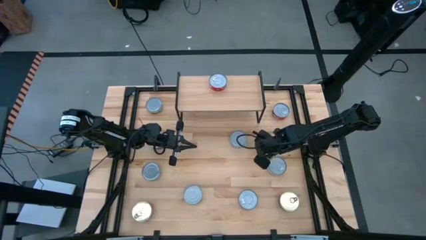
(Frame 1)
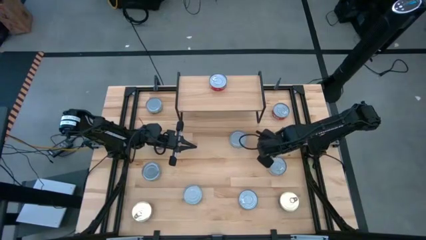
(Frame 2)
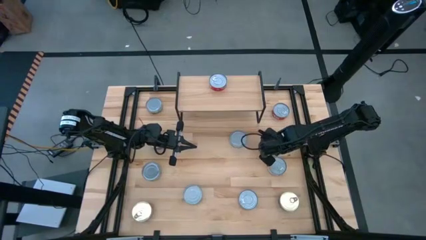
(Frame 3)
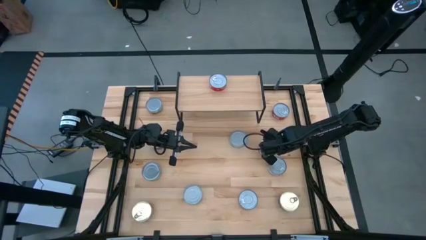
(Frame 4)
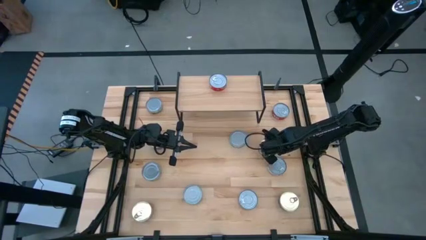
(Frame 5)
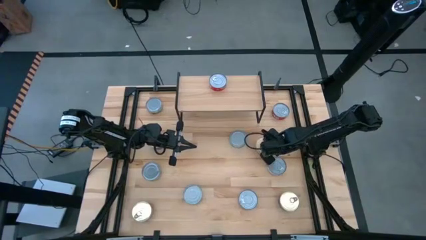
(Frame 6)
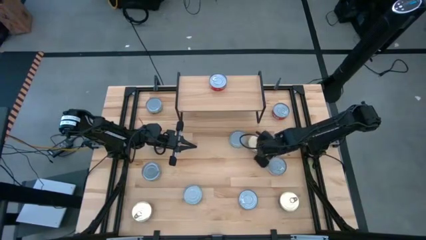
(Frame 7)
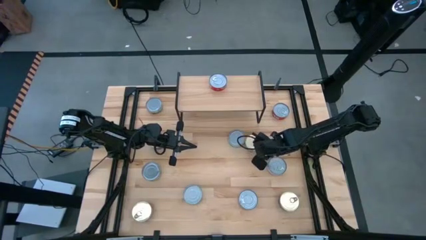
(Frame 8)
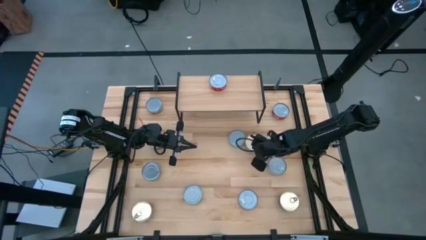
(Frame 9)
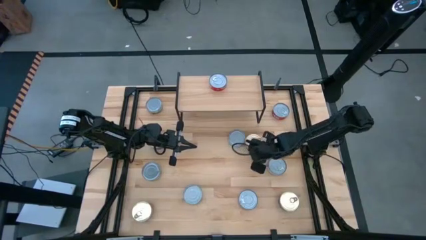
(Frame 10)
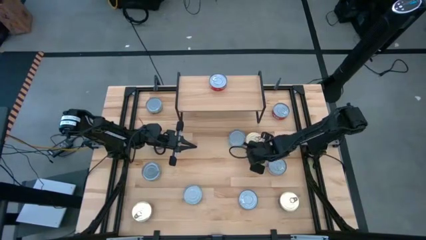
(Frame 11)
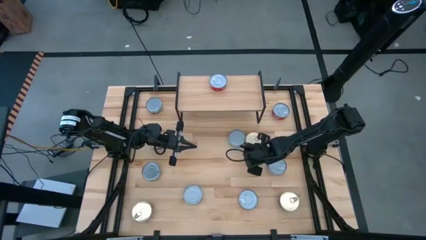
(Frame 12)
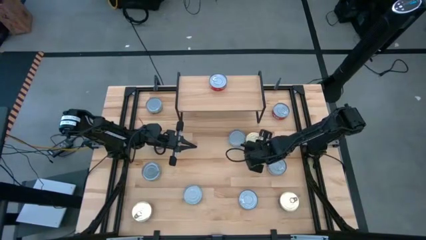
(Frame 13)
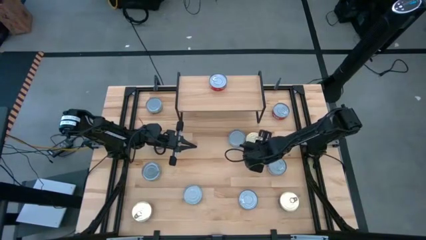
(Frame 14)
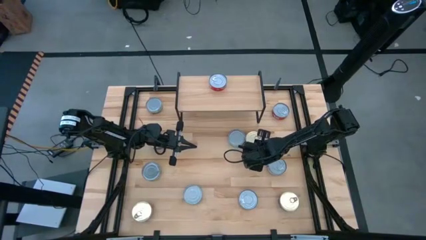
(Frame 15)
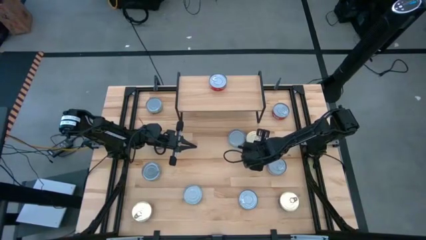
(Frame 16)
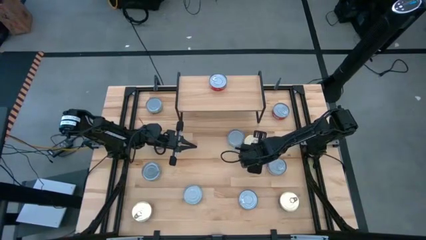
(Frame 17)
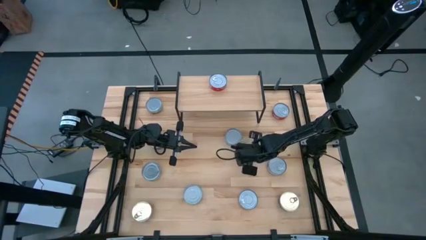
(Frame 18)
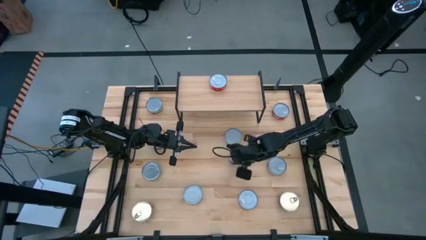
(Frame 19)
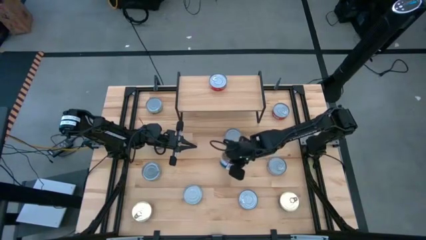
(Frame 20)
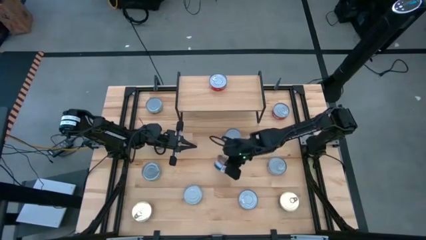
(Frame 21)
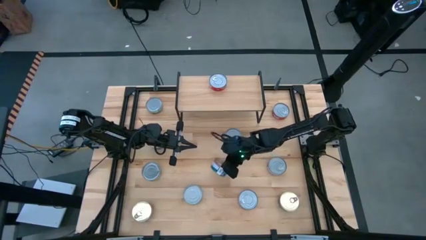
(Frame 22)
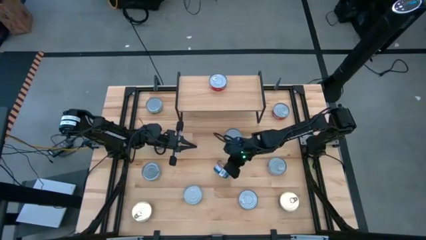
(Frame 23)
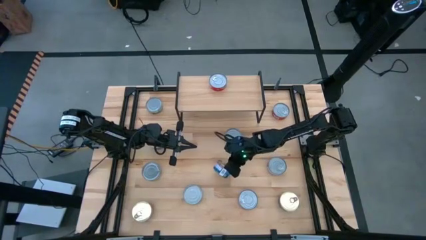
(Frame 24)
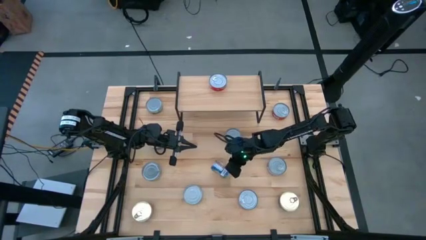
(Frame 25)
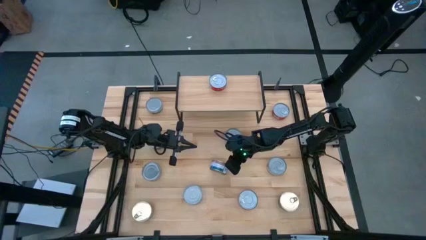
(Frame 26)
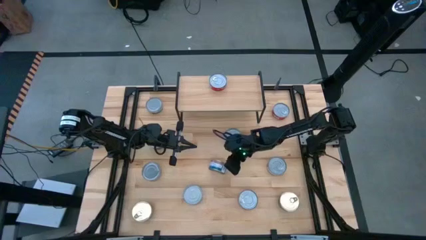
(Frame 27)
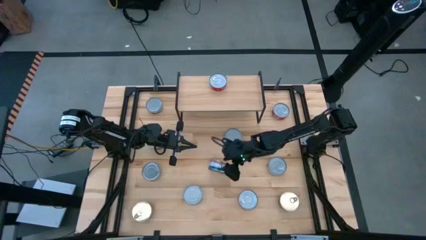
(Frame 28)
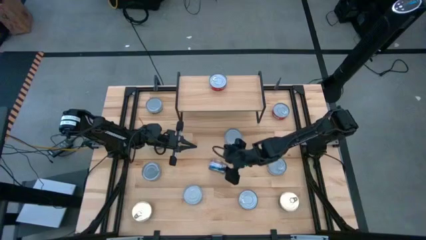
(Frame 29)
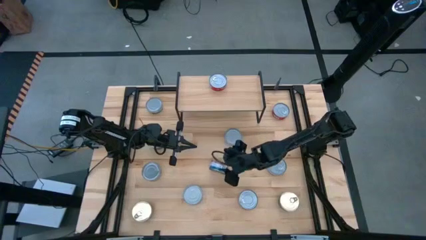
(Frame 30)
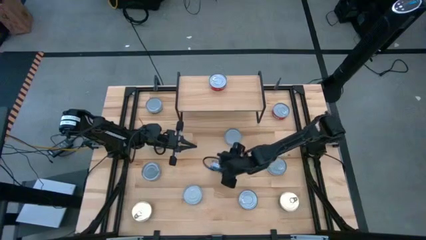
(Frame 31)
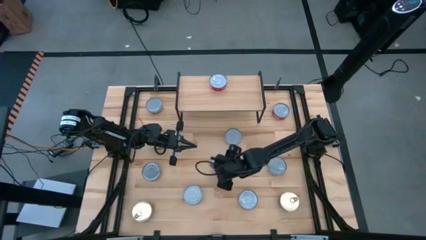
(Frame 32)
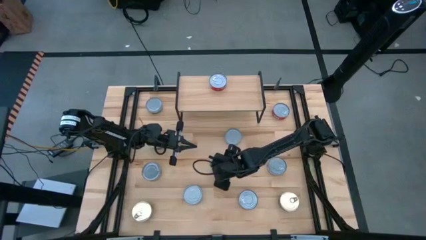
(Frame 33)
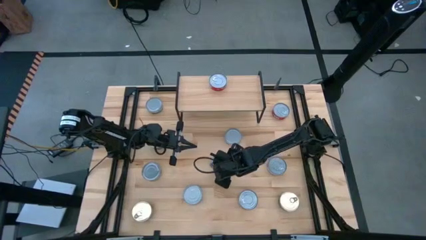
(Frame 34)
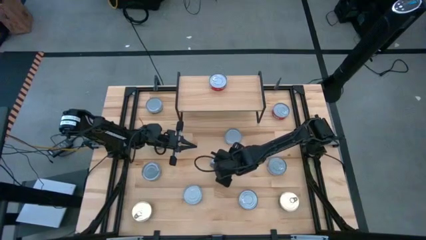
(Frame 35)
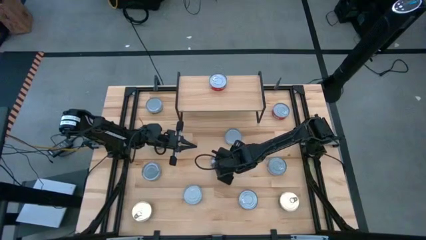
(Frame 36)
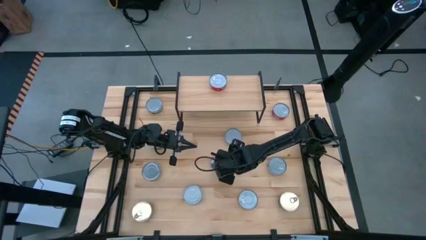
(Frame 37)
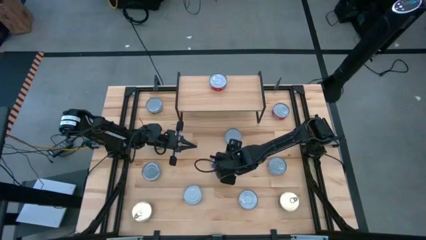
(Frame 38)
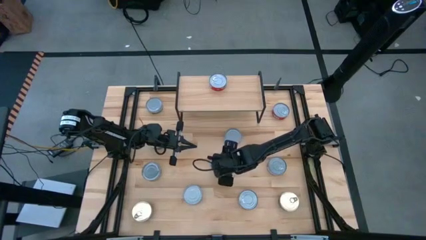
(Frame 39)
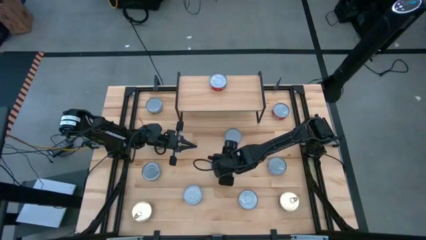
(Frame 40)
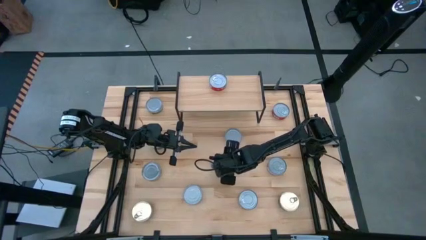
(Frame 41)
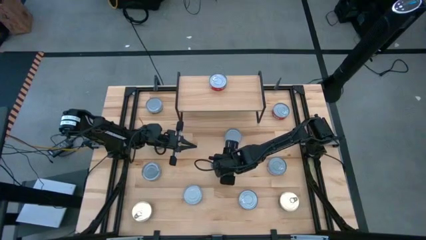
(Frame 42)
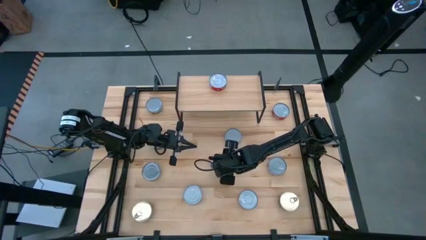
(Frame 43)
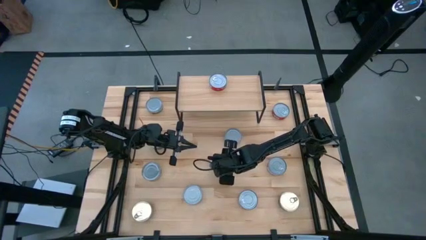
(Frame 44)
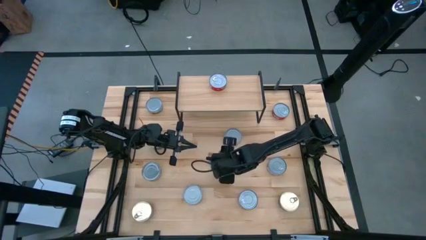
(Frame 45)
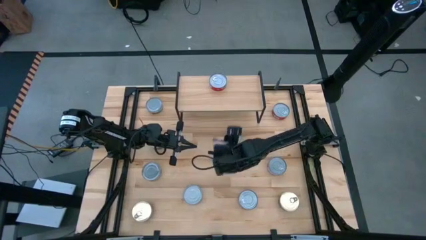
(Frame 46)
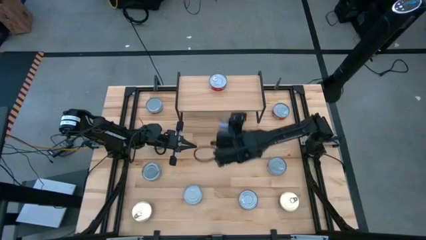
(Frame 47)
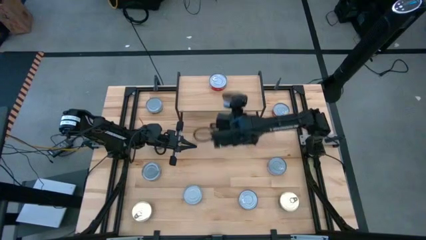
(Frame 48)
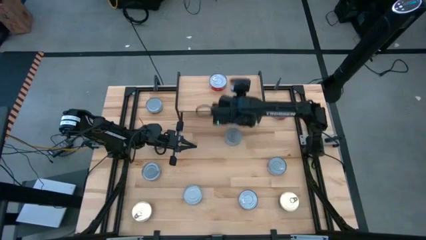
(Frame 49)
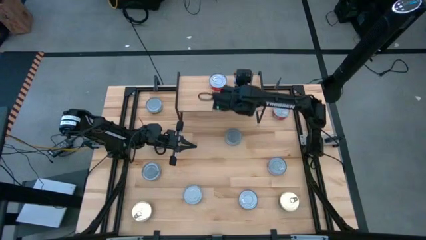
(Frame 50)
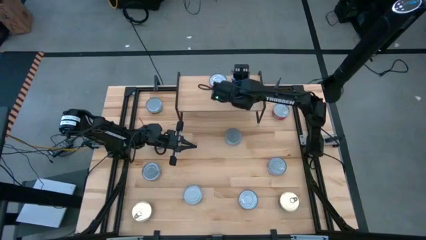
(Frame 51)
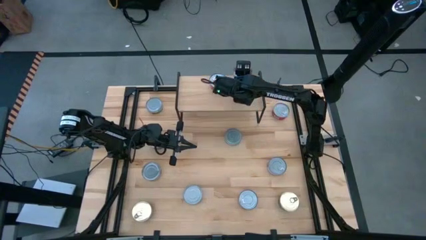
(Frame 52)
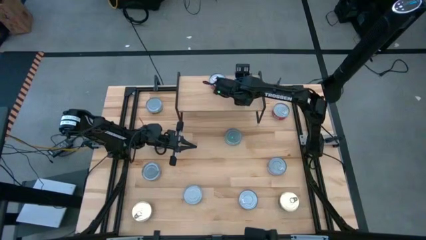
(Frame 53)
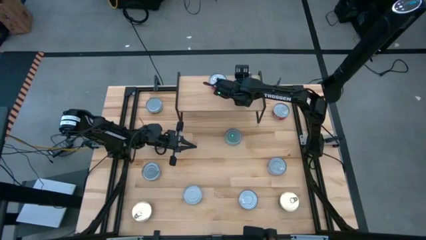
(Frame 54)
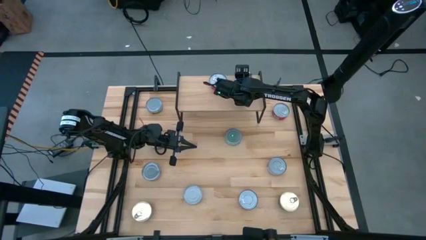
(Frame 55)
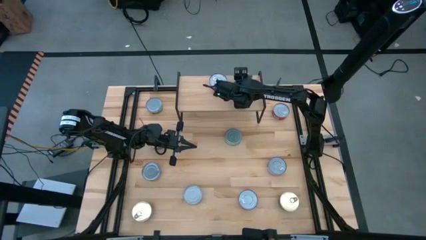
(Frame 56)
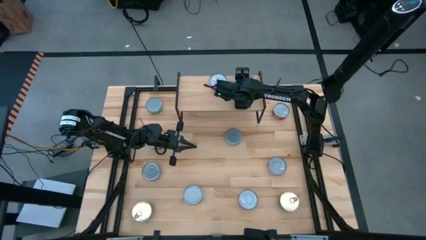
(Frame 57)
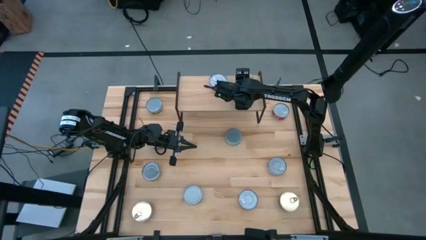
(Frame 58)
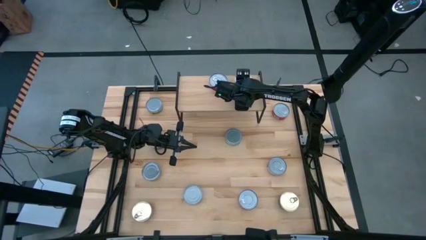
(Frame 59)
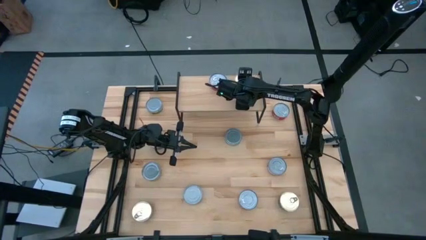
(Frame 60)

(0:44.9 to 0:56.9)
Task: Stack canned seafood by type on shelf
Put the blue and pink tuna can on the shelf

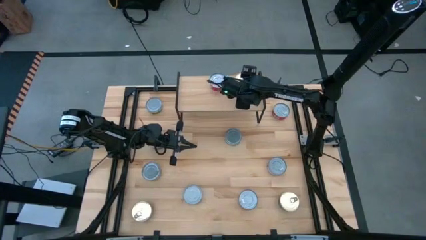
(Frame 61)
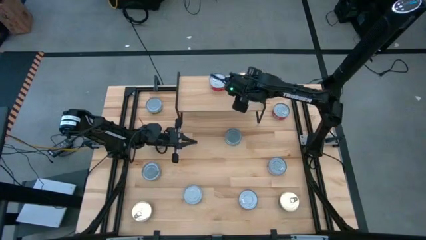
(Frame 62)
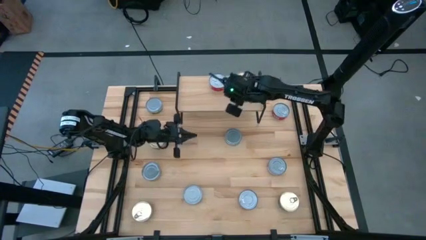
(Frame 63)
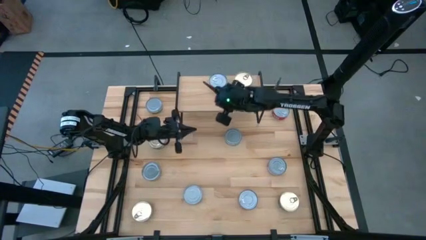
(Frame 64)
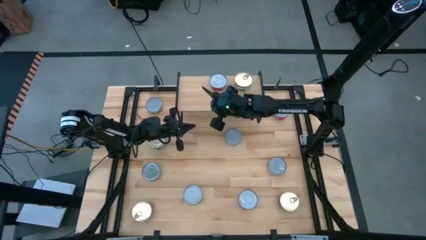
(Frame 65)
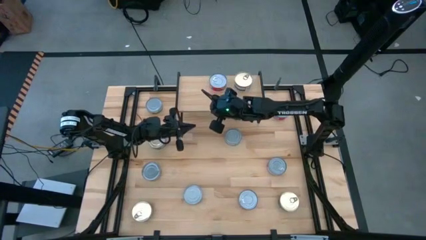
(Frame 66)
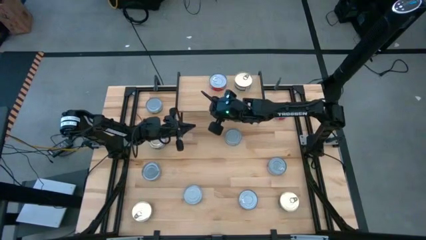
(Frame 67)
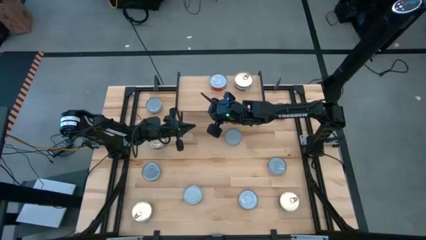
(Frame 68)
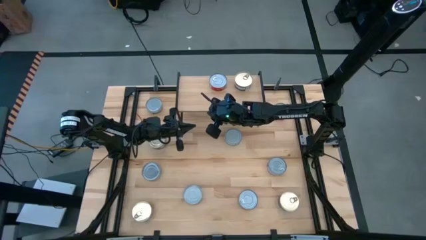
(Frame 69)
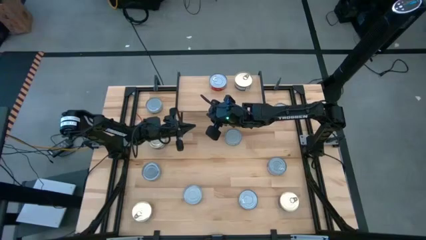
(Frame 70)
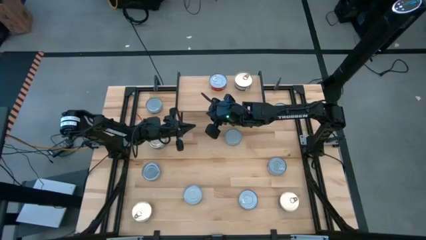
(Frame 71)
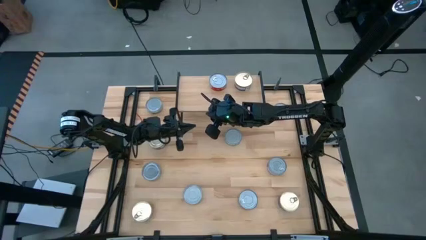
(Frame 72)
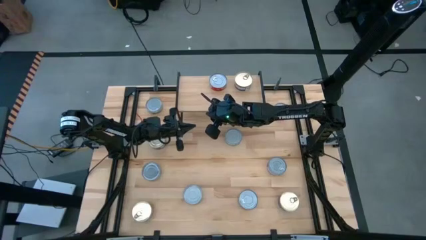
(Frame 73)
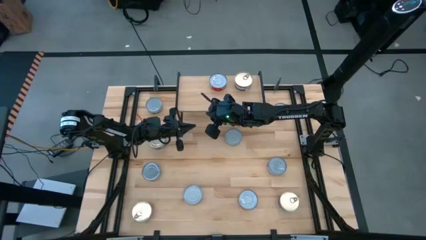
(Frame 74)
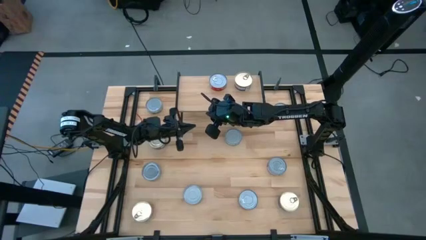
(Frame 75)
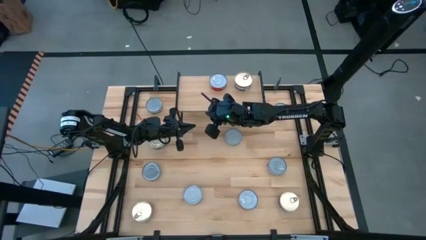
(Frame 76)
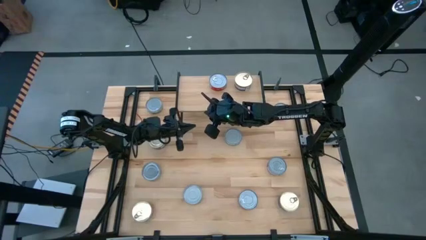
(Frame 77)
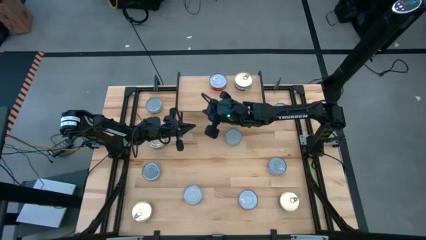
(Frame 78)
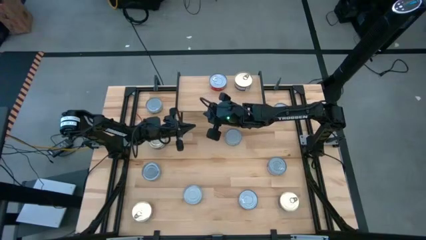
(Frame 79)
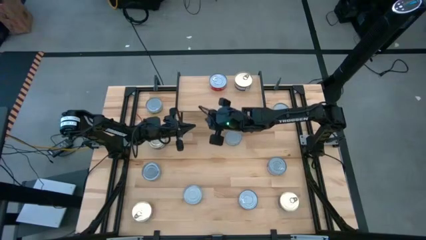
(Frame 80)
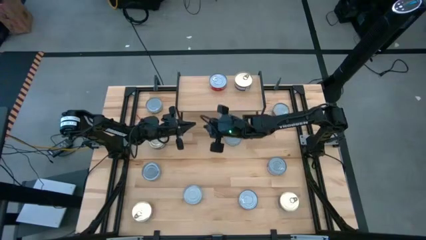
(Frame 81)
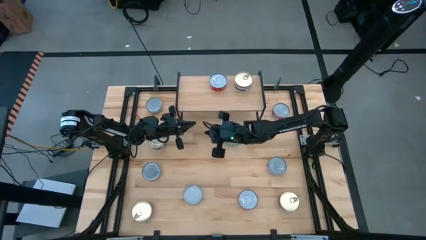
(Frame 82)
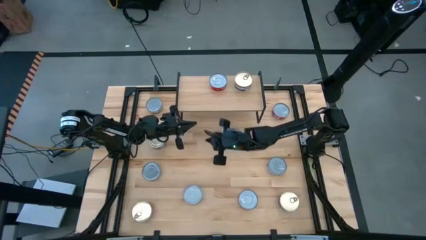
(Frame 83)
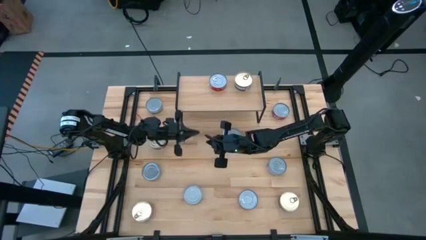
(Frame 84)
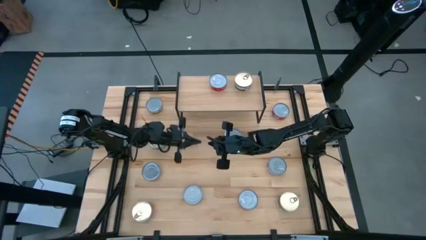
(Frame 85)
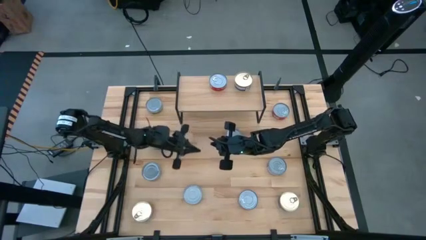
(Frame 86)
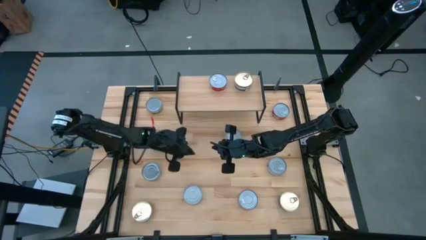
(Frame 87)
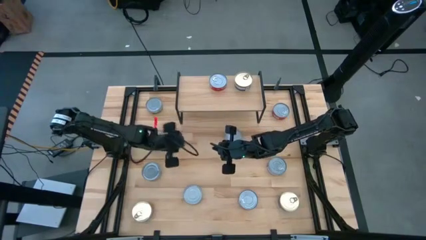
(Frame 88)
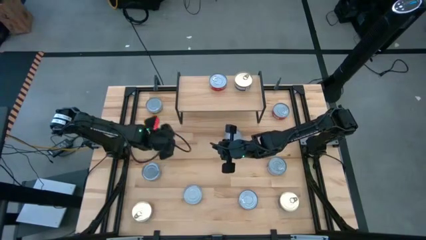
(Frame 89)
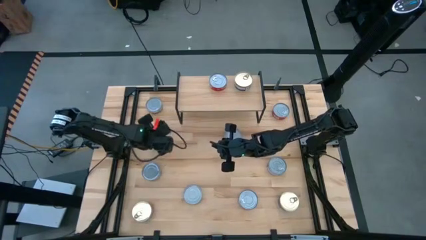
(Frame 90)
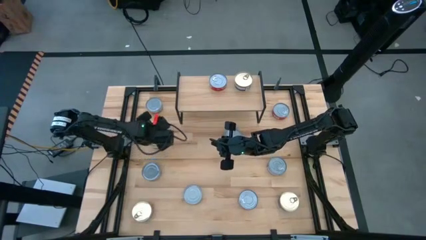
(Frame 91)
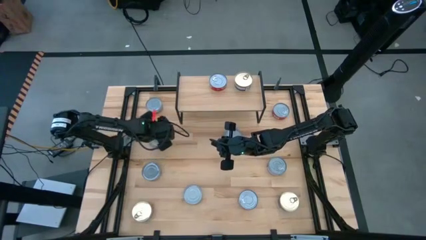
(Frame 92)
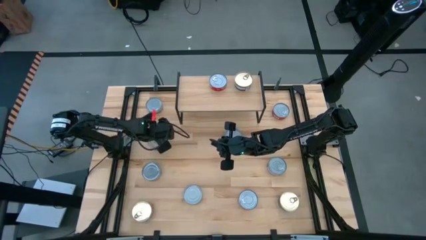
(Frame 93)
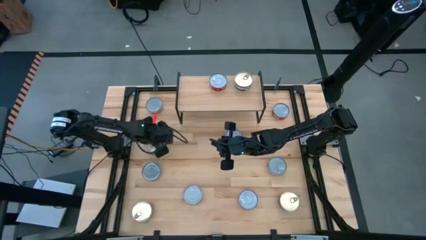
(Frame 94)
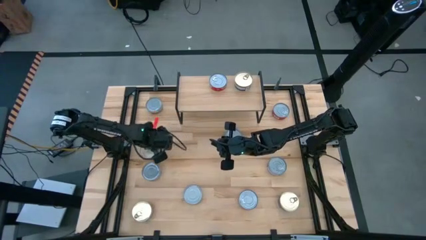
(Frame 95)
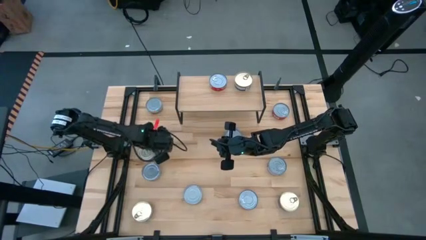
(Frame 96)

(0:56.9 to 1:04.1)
Adjust the blue and pink tuna can
